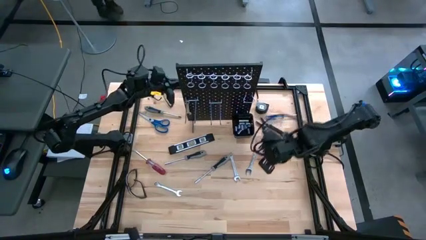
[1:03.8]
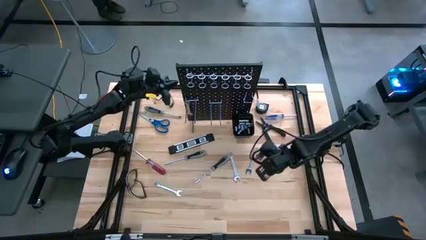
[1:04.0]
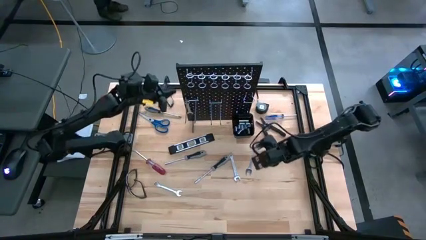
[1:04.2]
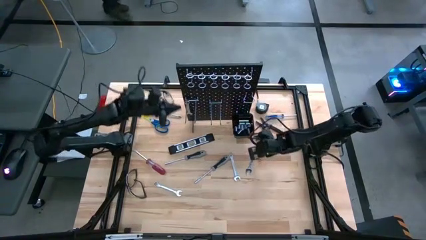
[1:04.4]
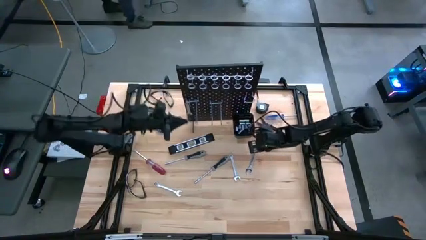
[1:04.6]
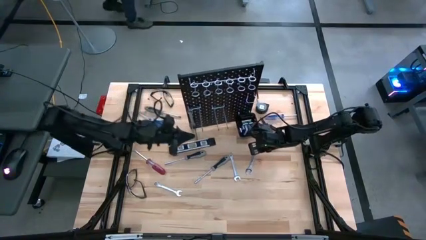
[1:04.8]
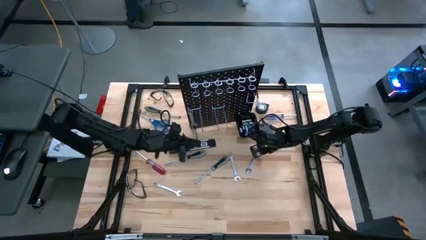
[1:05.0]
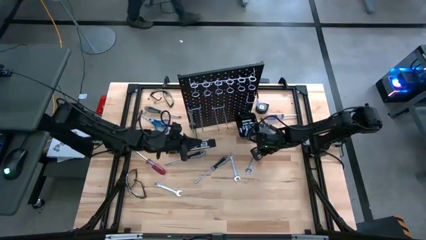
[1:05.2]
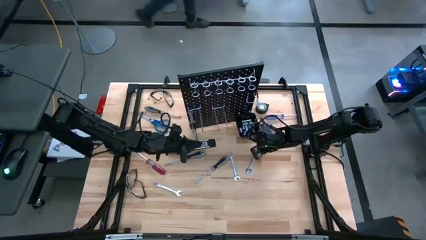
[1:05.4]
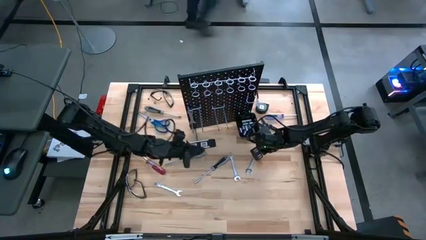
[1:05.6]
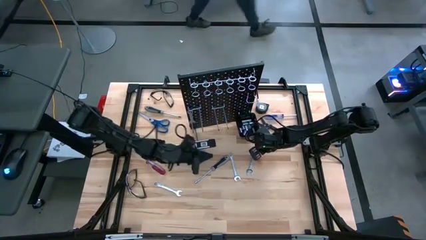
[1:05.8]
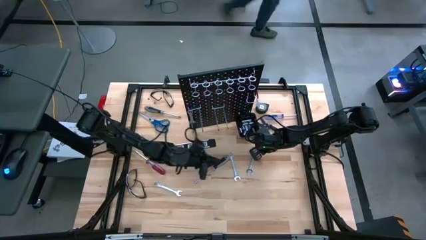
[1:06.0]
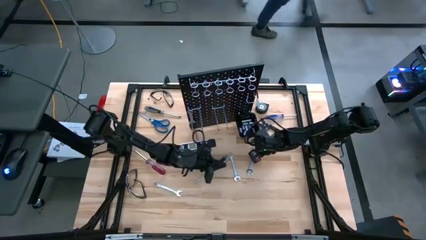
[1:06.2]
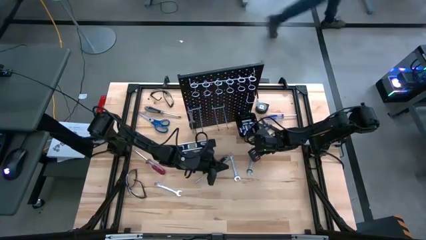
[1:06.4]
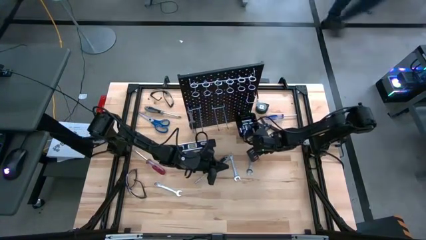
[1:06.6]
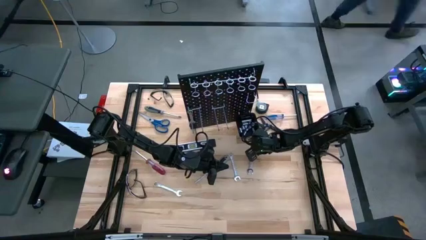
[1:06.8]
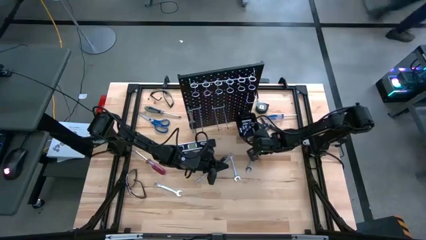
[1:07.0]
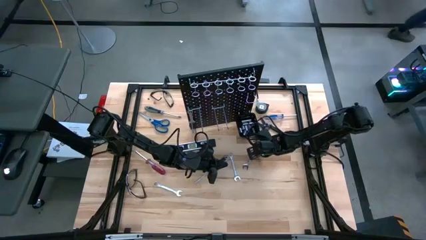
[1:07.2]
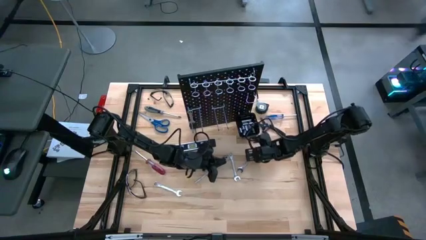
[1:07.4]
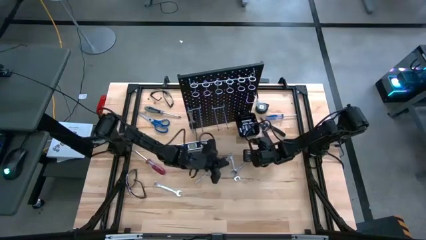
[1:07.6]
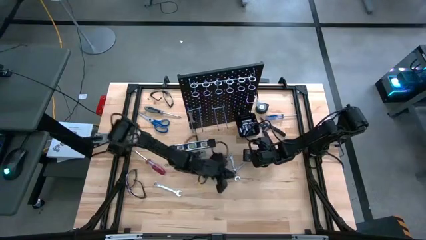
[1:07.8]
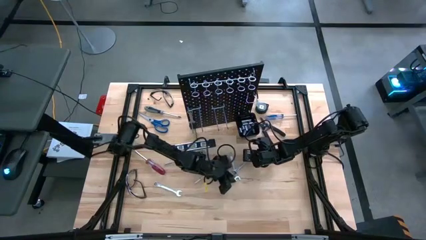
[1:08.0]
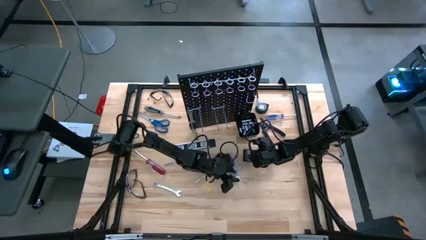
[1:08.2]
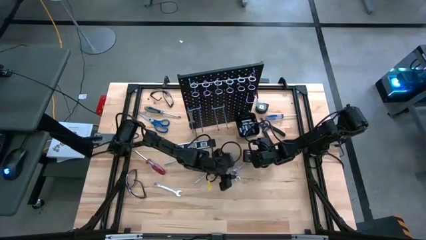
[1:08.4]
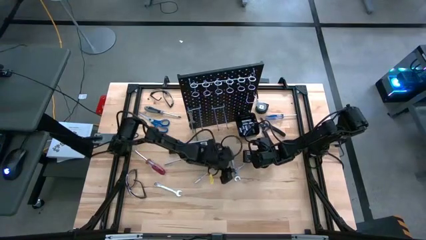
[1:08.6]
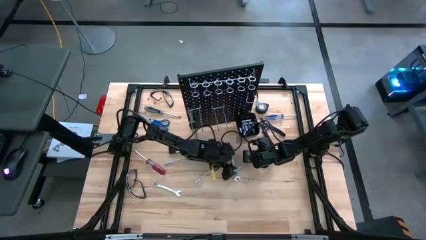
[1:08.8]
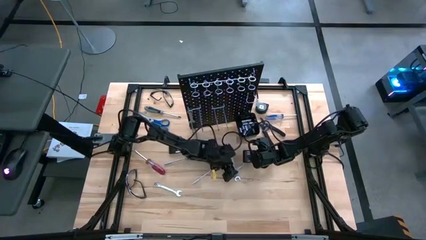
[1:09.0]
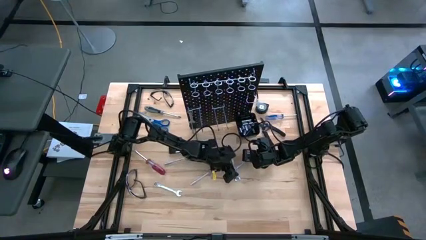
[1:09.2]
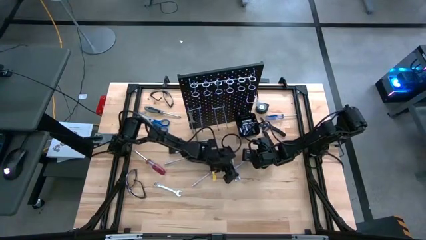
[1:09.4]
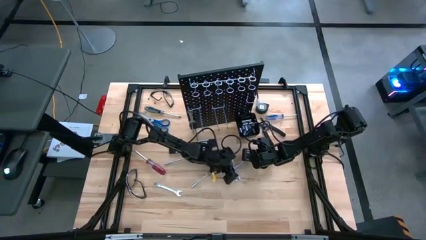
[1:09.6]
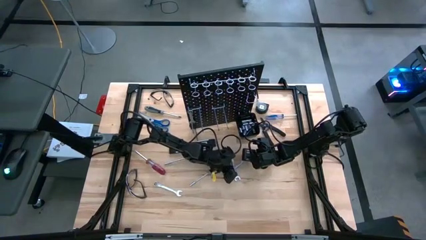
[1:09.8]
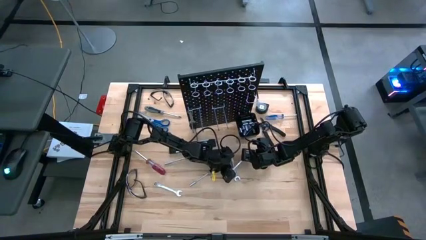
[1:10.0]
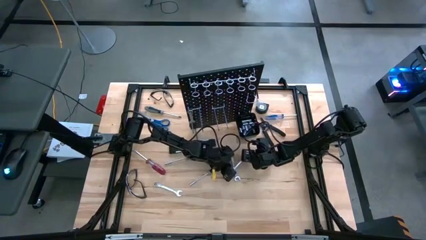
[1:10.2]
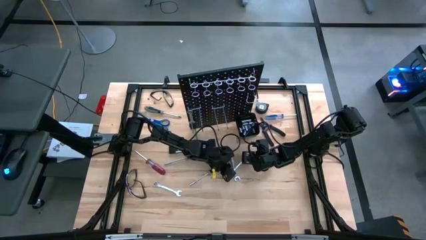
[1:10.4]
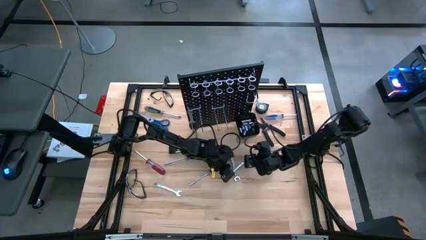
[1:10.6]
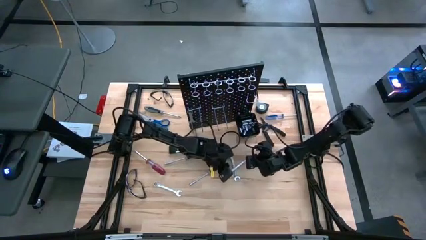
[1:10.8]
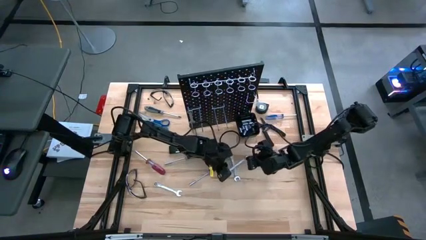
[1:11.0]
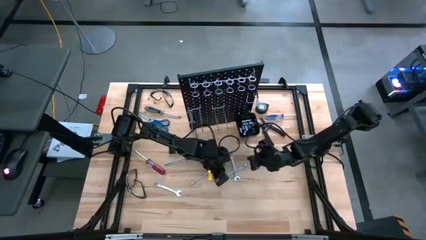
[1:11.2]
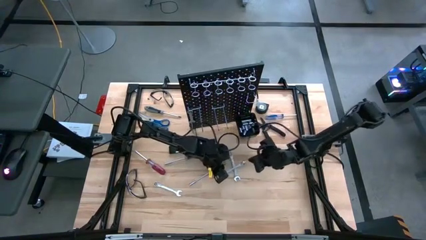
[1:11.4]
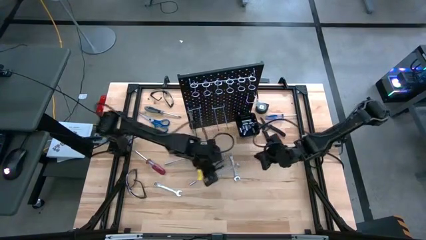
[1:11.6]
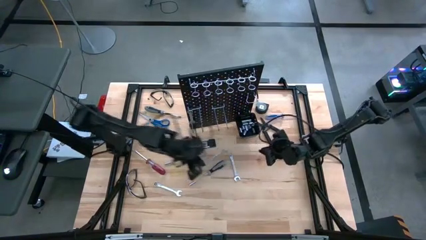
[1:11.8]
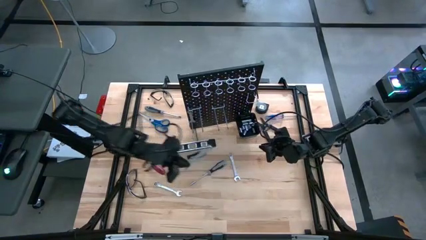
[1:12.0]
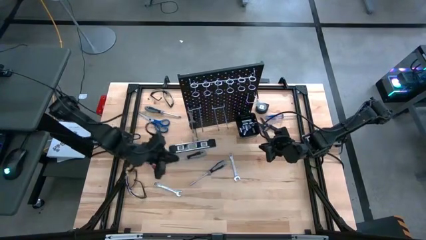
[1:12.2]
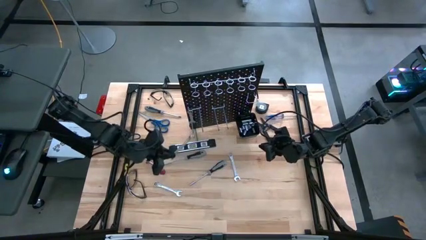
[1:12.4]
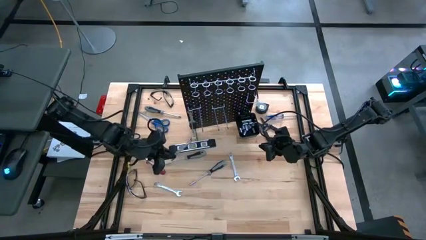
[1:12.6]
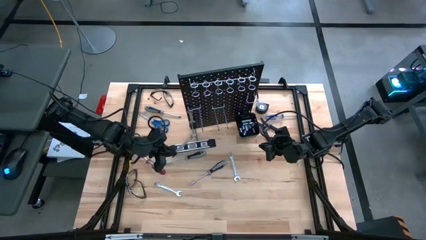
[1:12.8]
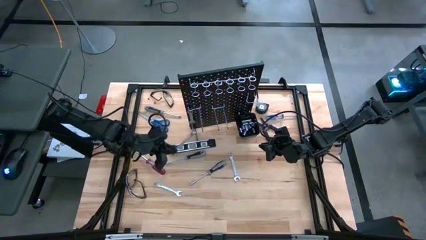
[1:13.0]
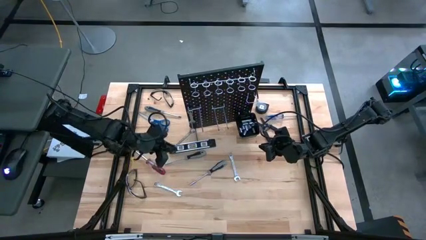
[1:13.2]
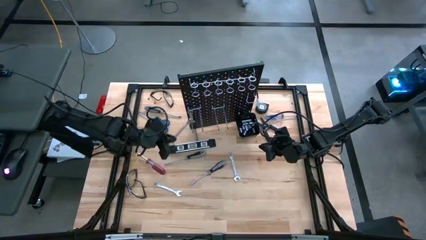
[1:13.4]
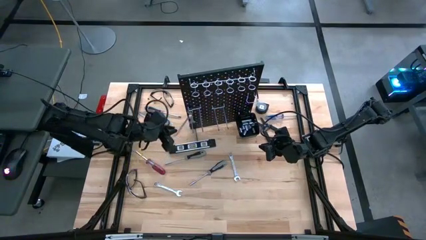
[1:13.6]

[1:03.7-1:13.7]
Task: Hang tools onto peg board
Hang the silver wrench on the pegboard

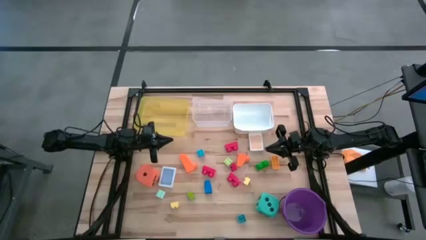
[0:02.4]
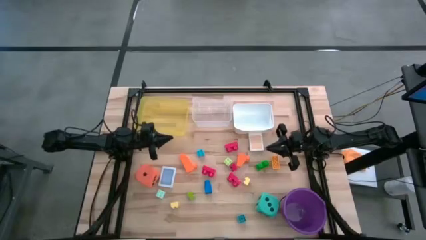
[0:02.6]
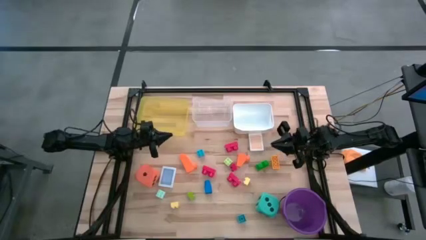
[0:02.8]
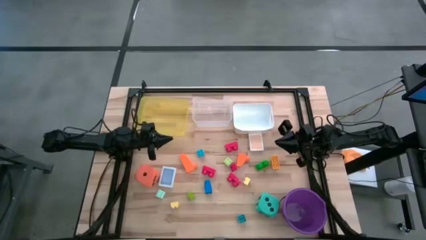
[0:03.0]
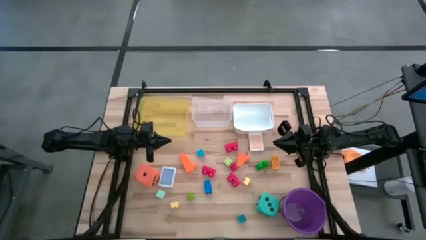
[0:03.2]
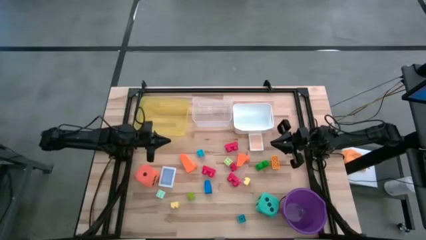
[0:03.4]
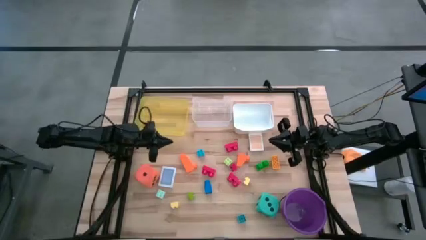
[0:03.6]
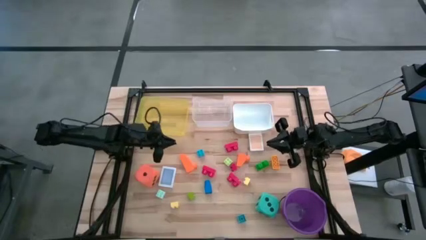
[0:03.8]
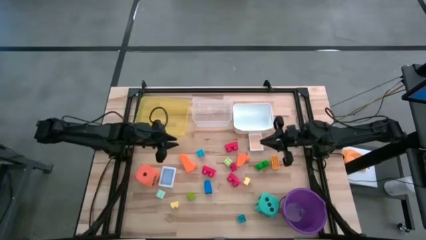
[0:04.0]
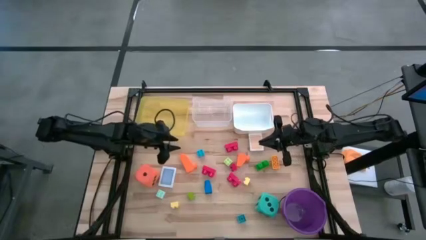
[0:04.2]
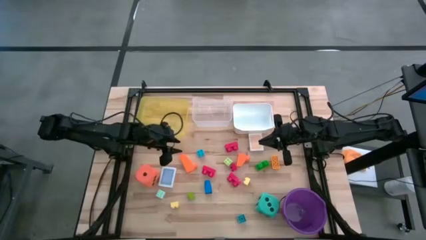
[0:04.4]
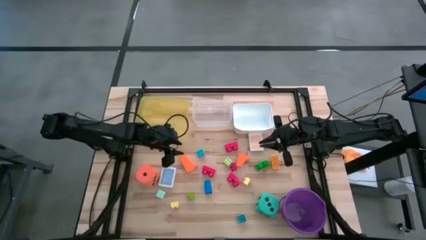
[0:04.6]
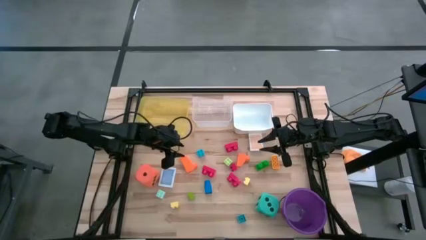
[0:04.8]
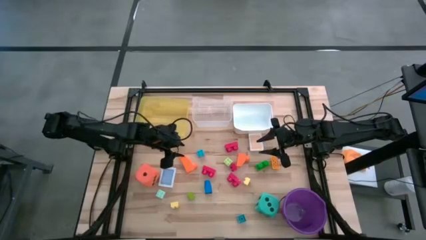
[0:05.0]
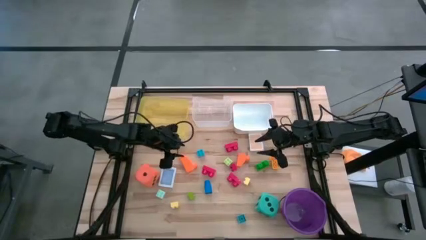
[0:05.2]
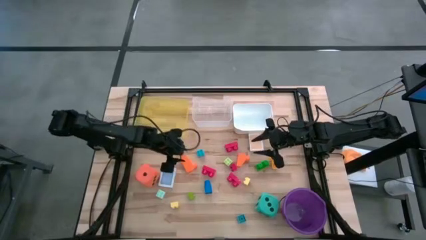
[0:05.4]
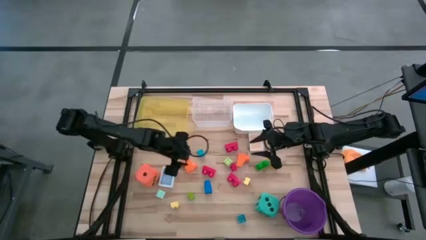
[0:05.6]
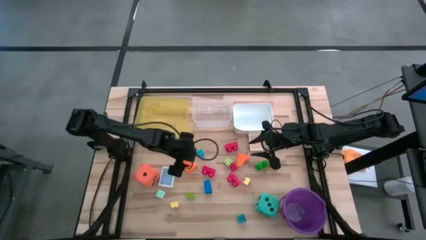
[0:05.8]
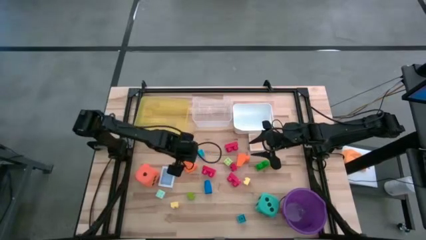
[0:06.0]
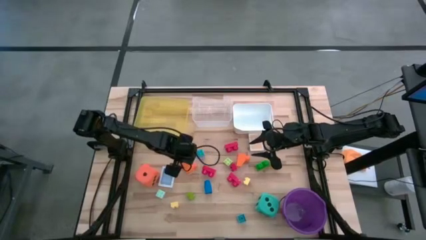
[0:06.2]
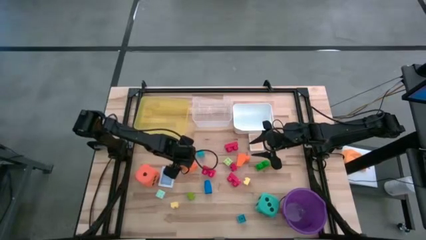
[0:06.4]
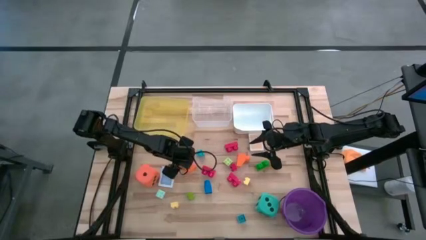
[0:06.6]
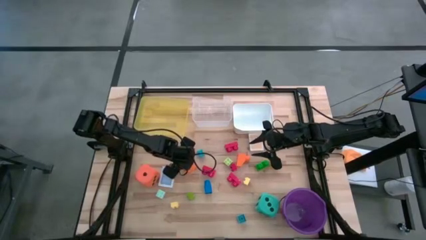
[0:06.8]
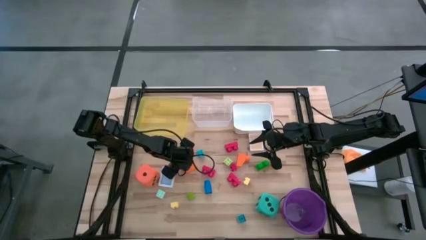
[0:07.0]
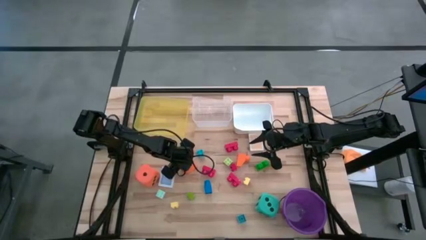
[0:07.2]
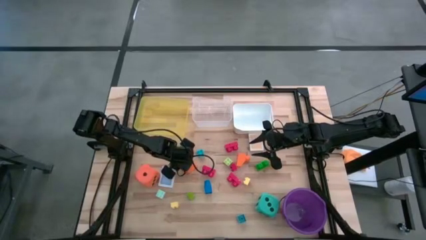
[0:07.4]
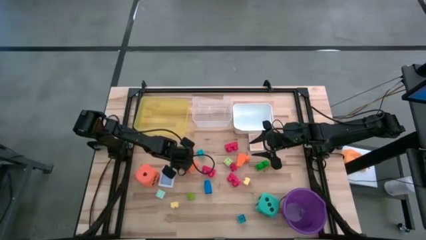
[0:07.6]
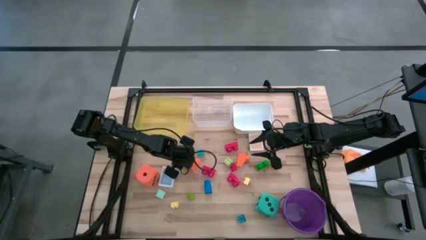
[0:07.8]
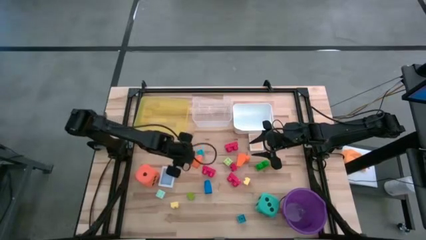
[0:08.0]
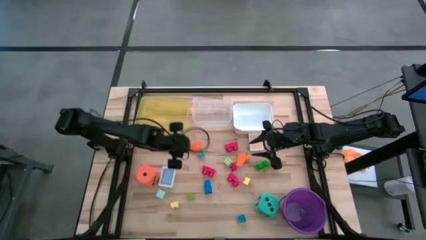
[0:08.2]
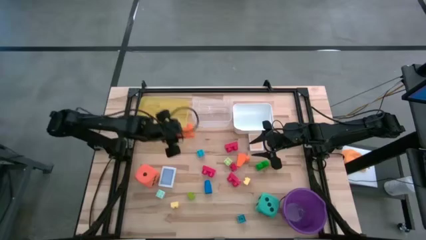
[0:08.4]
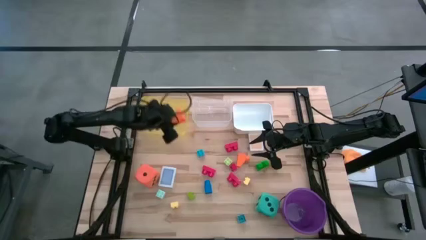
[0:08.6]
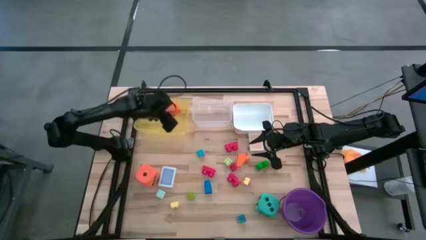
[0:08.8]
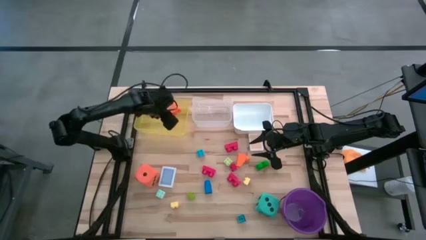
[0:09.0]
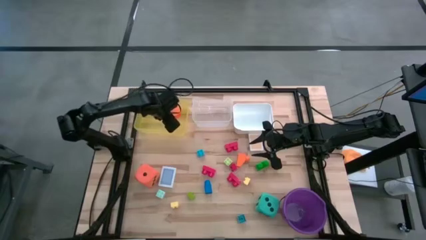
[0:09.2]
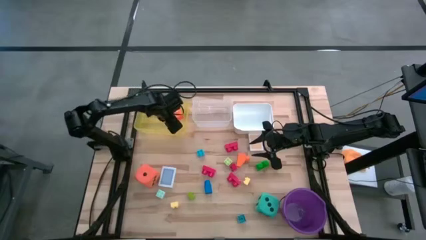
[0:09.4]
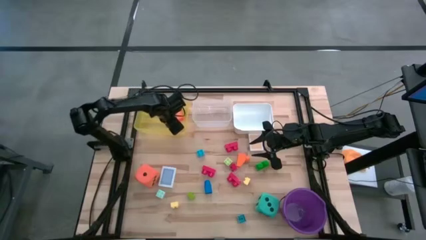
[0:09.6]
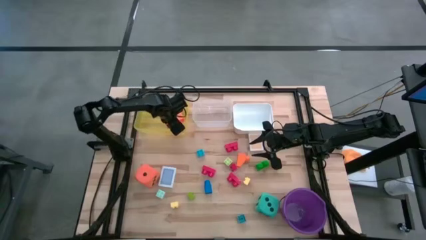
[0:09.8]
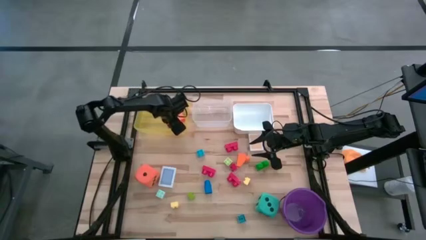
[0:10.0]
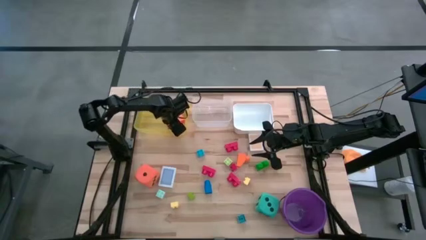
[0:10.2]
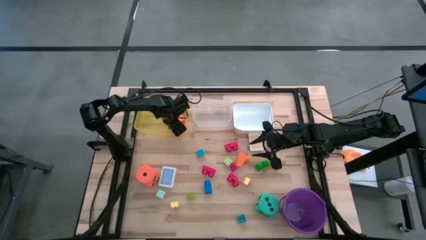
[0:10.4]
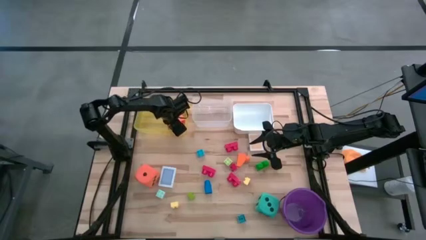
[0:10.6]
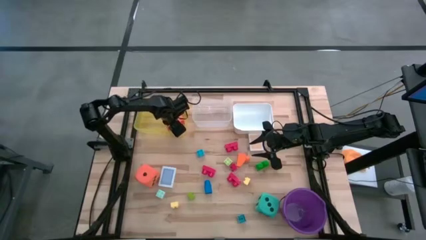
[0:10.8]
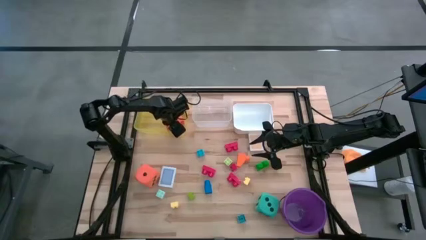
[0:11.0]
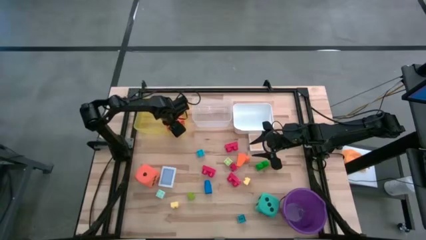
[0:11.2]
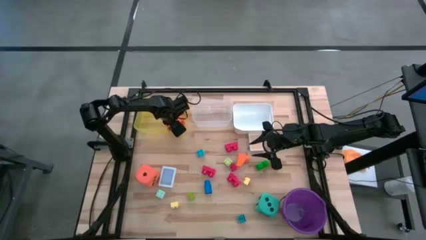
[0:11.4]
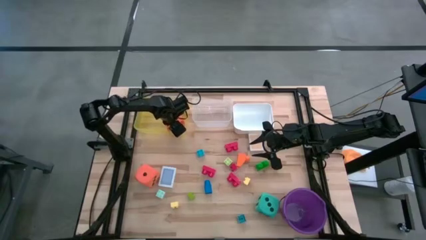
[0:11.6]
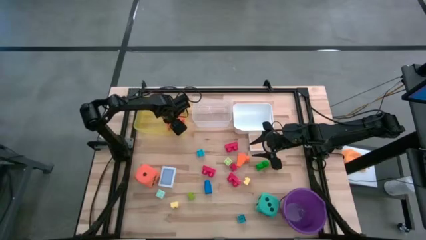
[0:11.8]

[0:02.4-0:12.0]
Task: Pick & Place Toys
Put the orange game piece into the yellow bin
